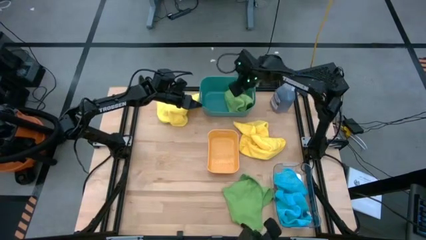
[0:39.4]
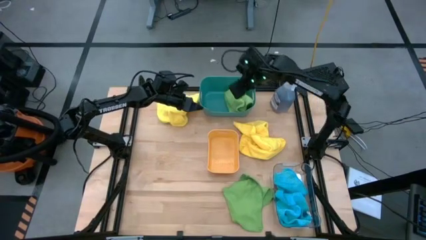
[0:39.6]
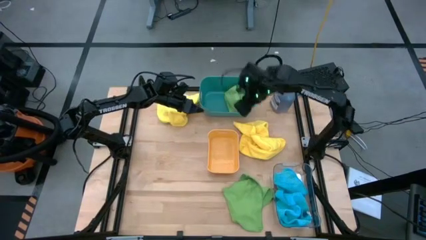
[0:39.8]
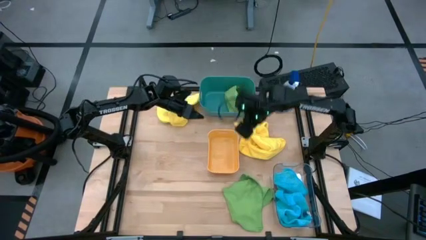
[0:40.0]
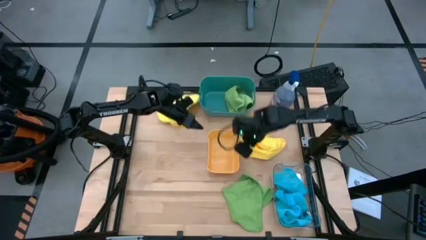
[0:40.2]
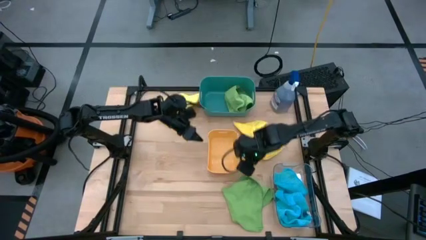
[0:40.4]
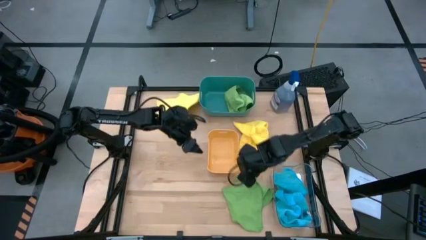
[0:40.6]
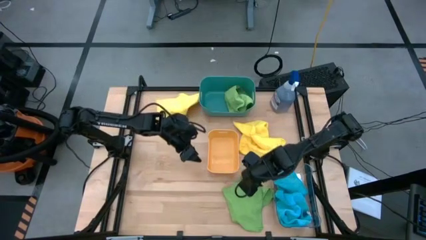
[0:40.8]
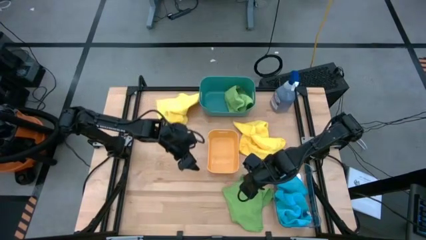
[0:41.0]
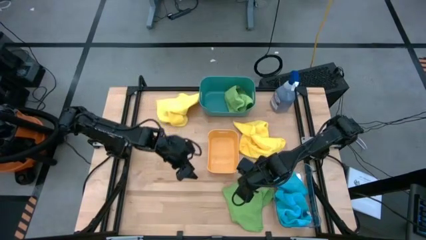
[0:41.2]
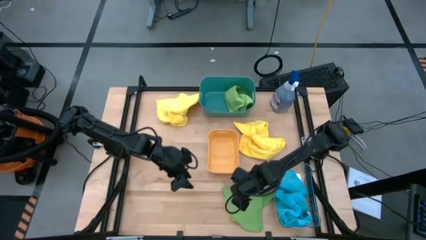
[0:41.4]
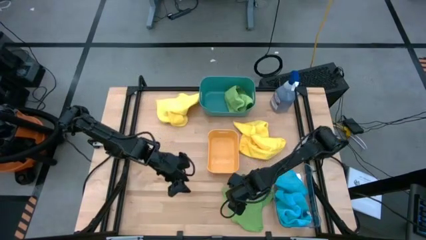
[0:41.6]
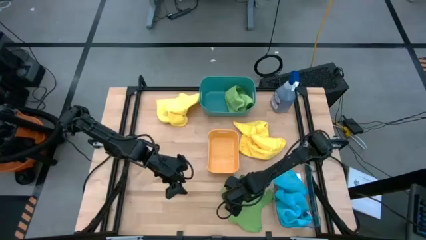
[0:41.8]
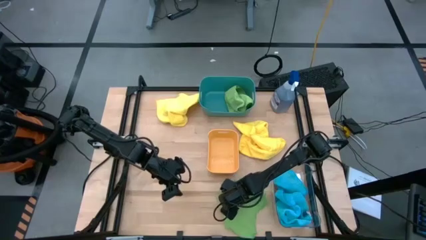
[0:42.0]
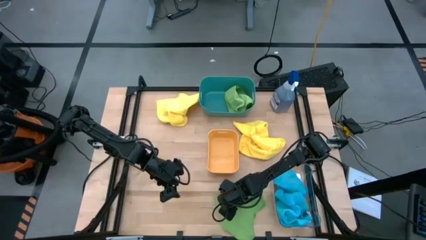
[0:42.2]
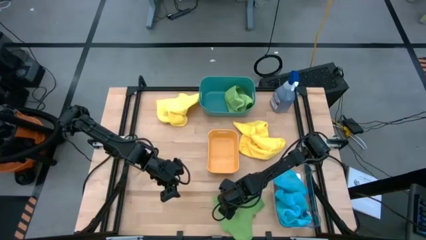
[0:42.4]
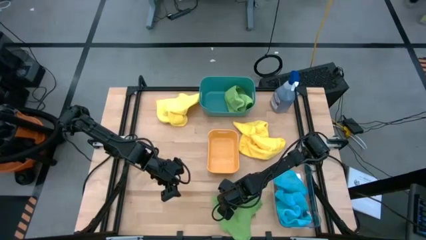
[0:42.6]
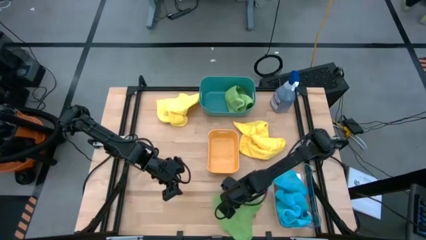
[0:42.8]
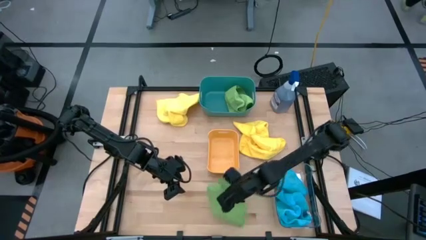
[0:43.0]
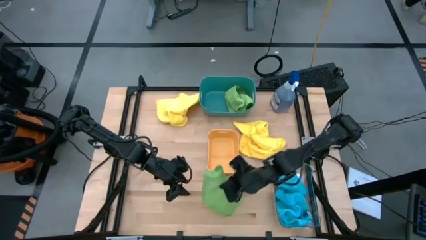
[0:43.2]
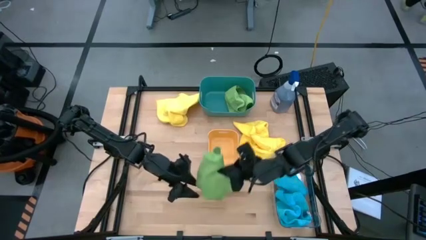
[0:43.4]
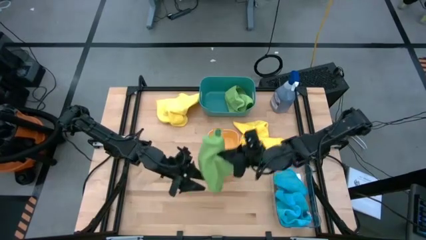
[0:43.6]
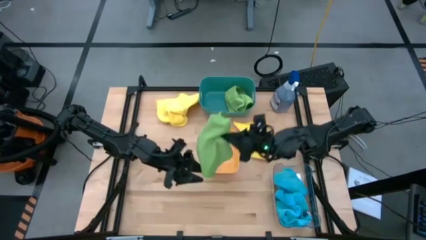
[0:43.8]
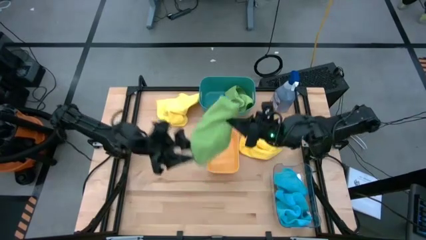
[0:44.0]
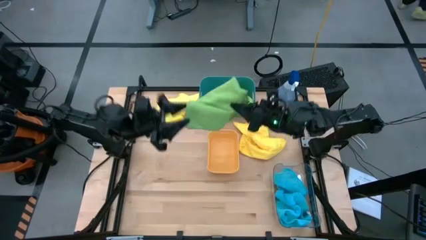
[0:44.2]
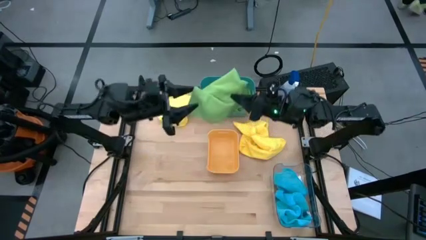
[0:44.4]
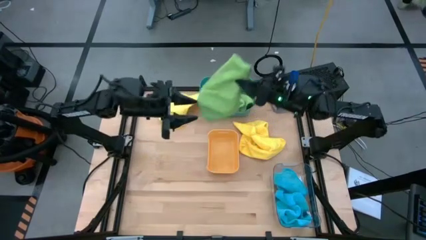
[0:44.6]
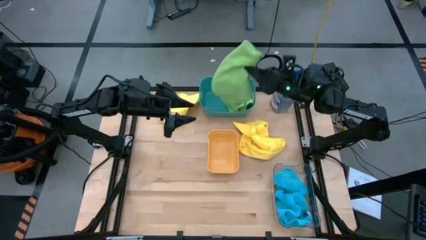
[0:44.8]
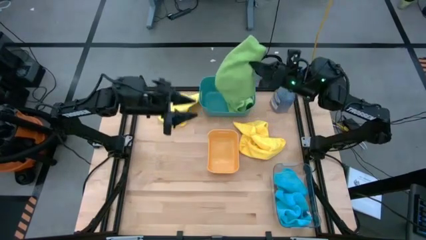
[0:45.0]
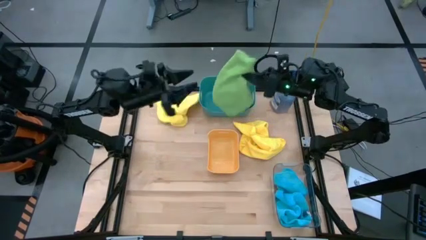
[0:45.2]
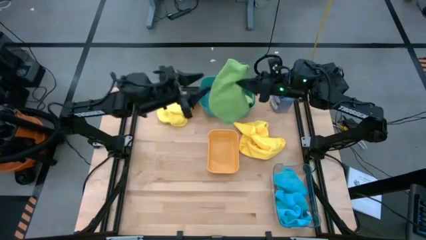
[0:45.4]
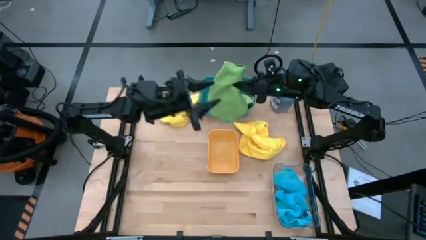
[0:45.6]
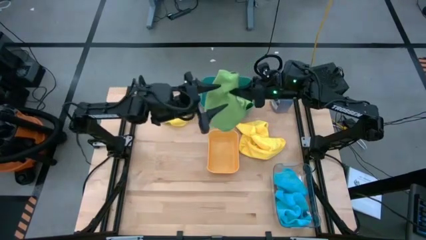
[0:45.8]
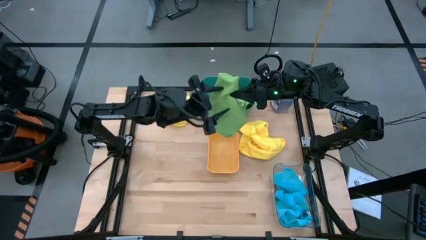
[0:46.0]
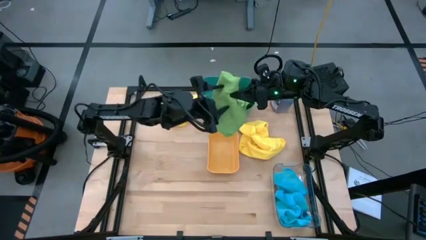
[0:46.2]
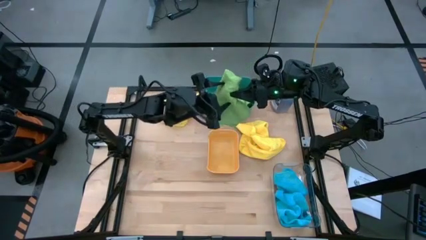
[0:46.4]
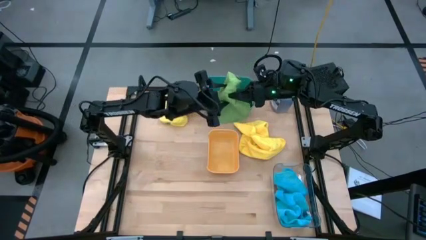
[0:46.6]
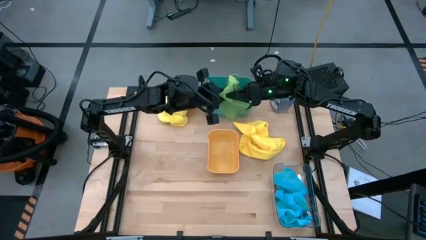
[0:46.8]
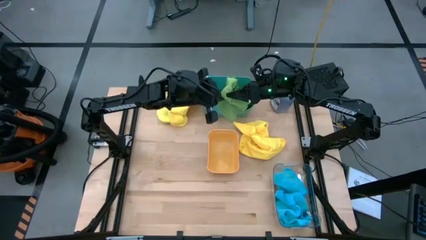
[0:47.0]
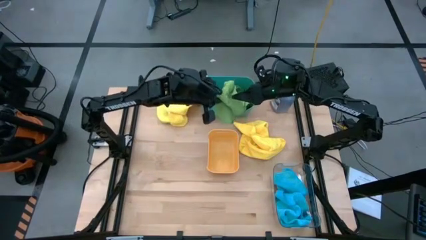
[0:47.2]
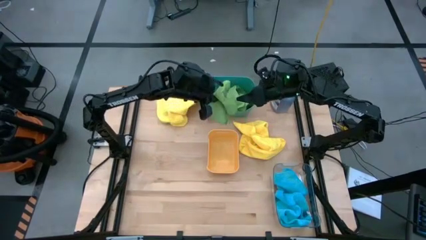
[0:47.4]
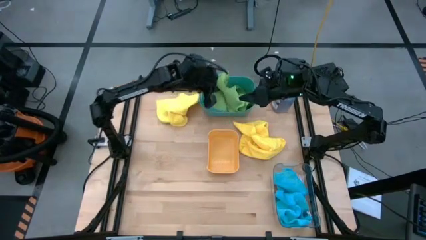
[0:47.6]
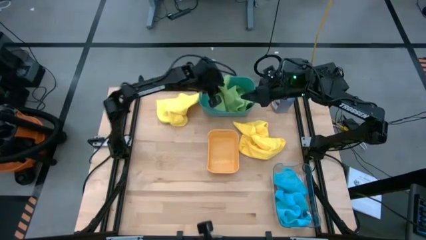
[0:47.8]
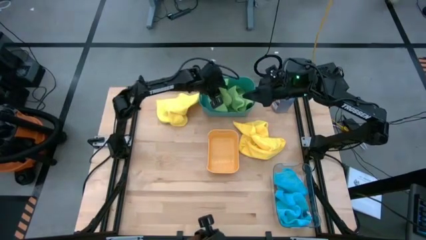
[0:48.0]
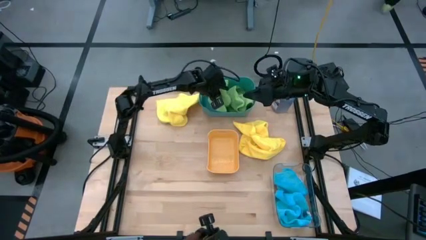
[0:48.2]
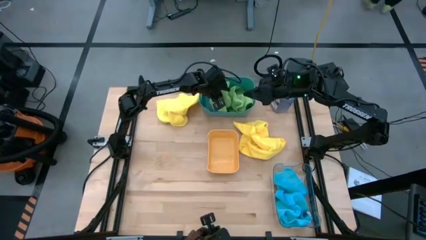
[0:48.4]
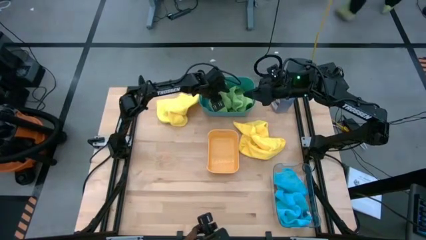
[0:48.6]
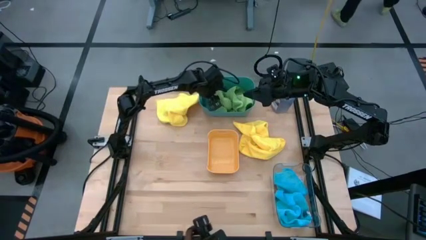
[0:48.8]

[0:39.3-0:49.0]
Task: Sort microfiber towel by color & place in baskets
Put the green microfiber towel into the blue bin

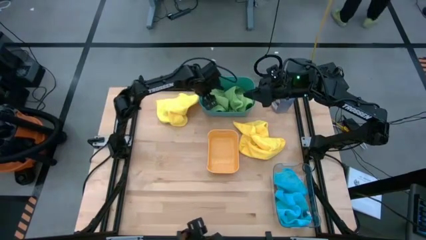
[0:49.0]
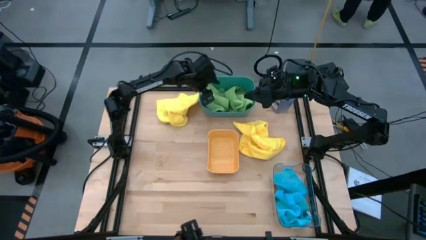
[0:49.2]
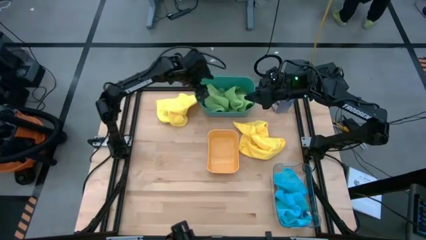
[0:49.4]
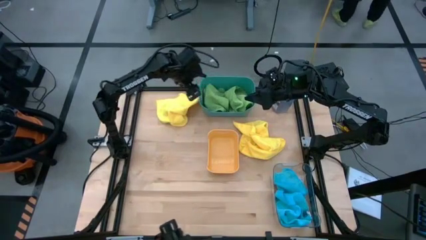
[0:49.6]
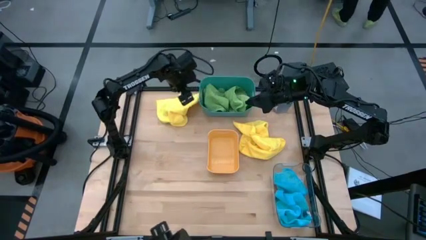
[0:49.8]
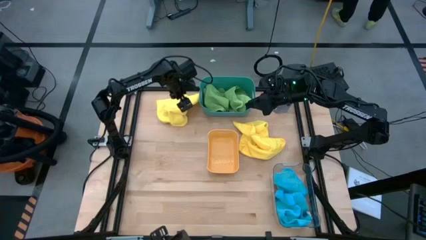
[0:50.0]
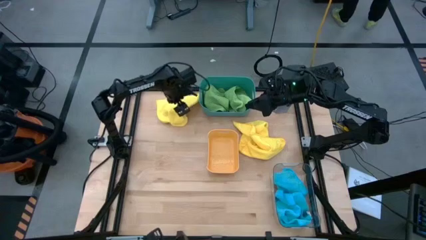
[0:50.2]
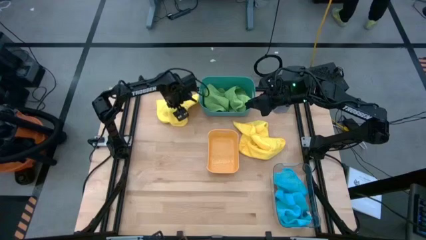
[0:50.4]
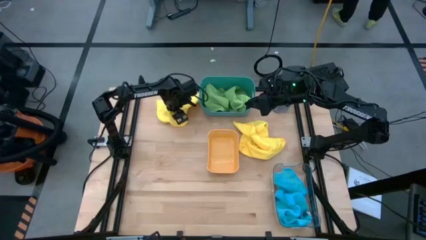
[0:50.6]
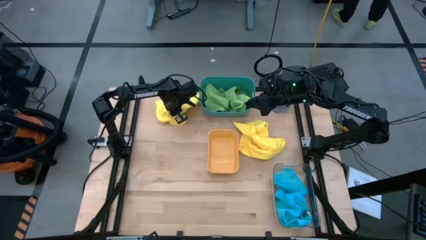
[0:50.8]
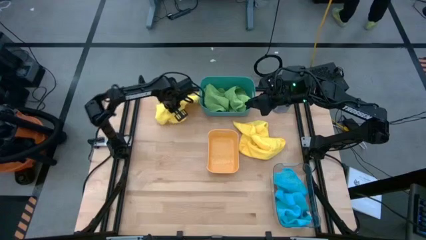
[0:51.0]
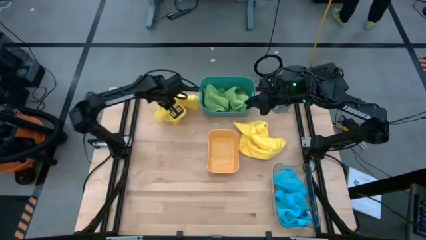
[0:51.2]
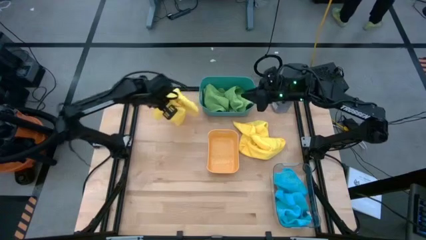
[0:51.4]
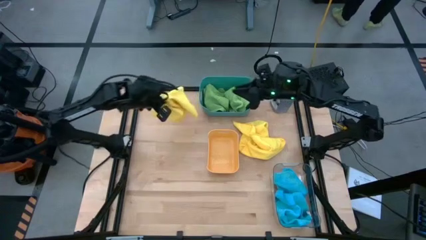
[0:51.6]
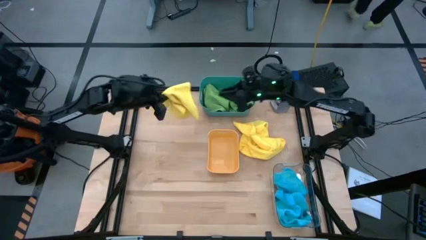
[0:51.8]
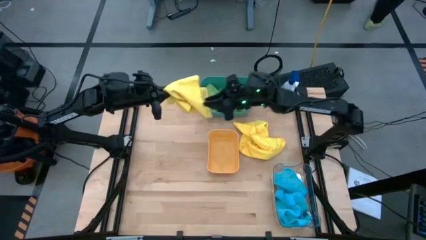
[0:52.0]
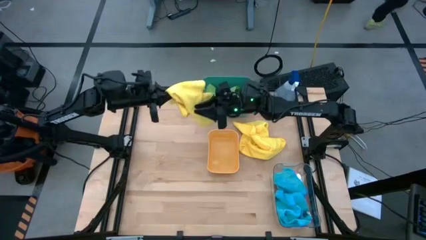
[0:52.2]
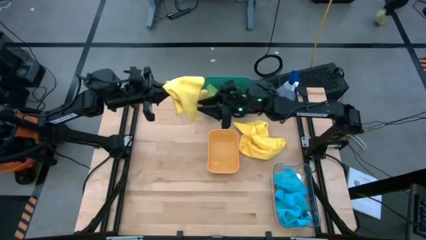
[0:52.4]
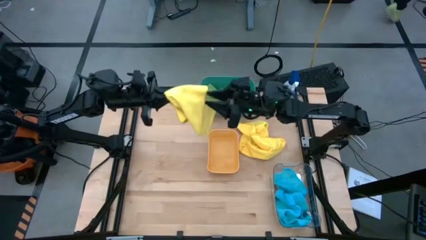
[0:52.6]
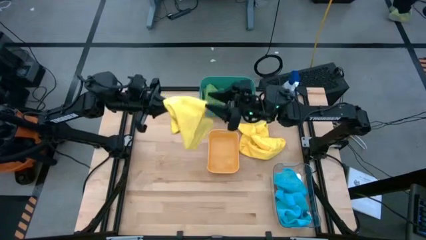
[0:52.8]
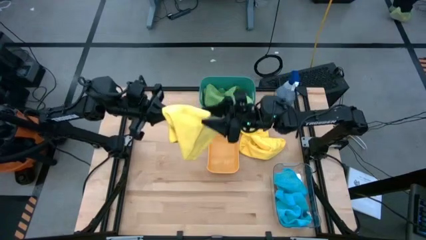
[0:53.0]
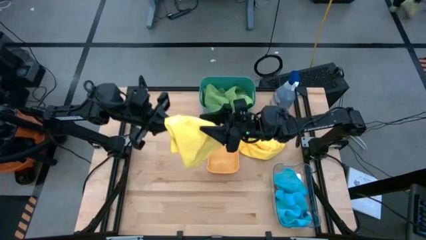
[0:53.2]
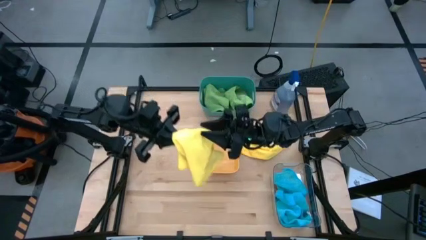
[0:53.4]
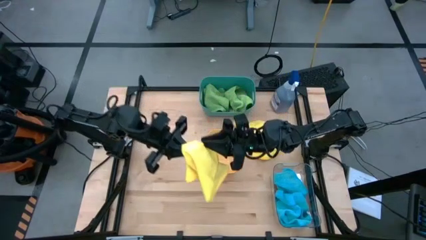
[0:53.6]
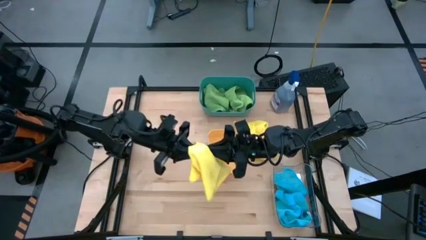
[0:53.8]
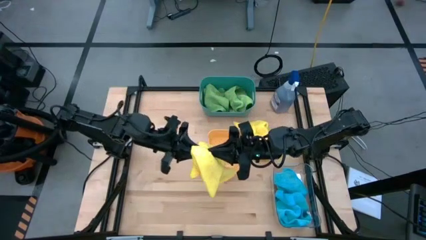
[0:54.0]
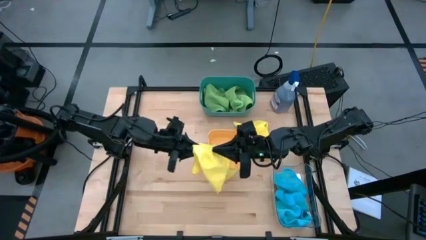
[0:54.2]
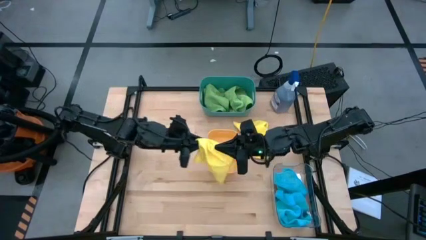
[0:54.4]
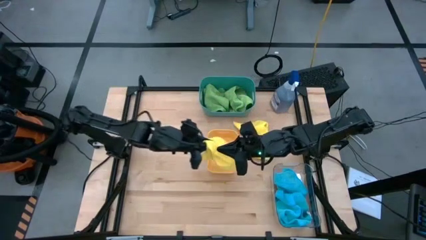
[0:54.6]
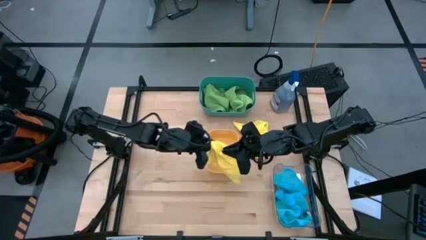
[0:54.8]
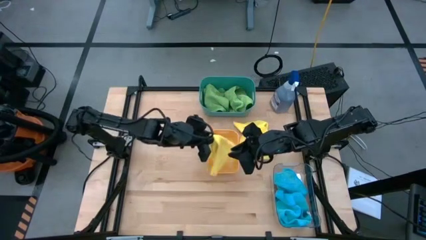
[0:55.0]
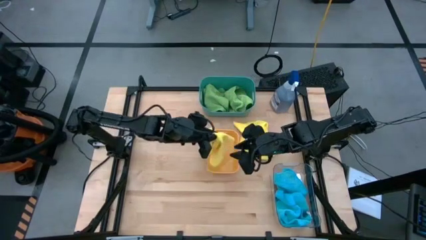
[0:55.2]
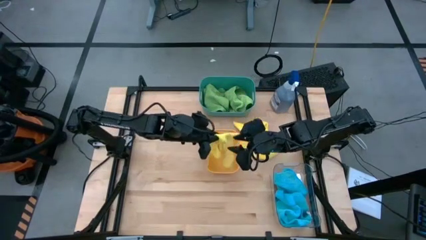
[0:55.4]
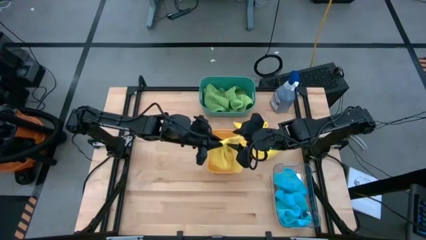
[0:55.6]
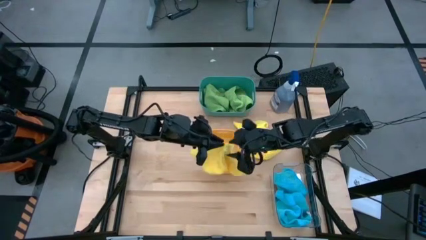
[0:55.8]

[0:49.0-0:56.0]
Put the left yellow microfiber towel into the yellow bin
